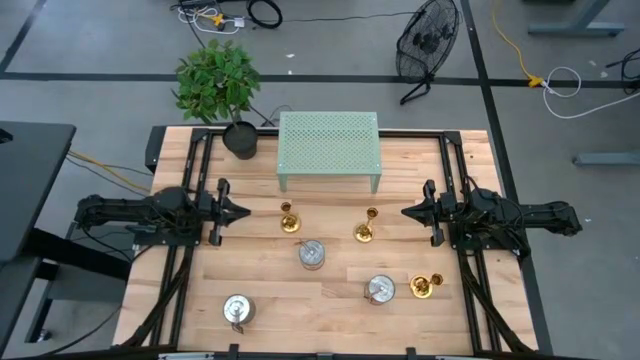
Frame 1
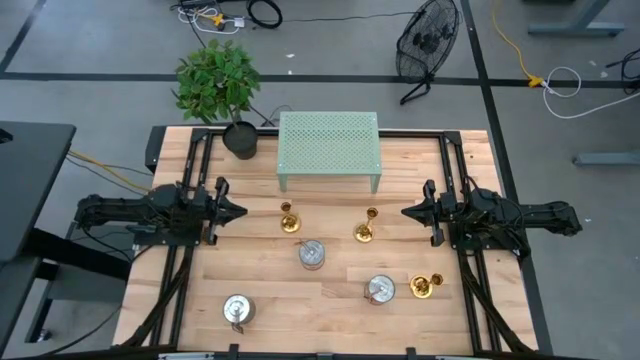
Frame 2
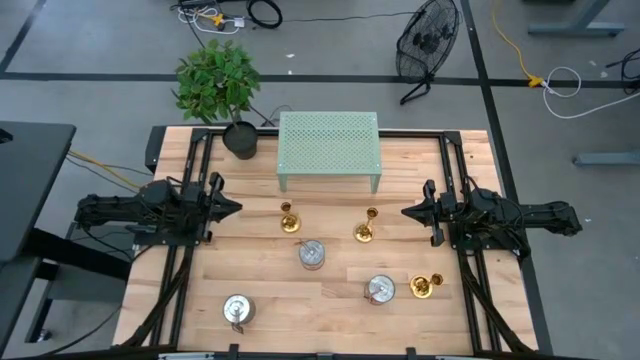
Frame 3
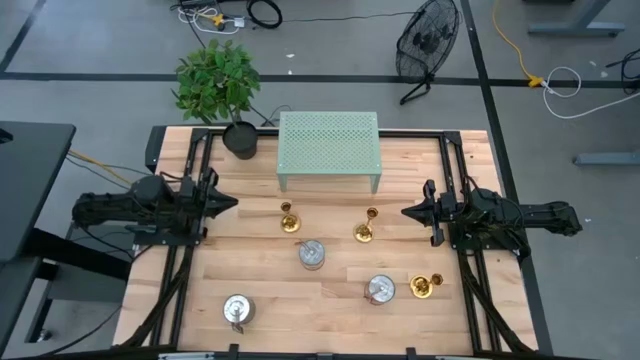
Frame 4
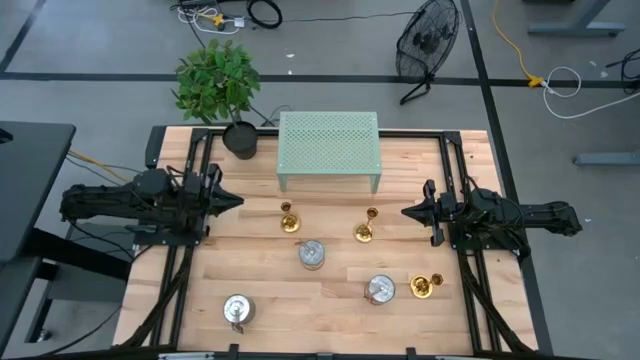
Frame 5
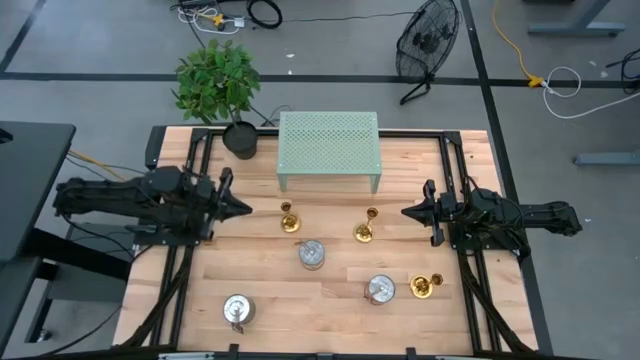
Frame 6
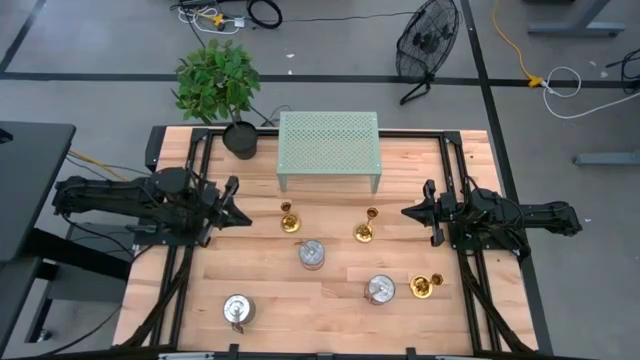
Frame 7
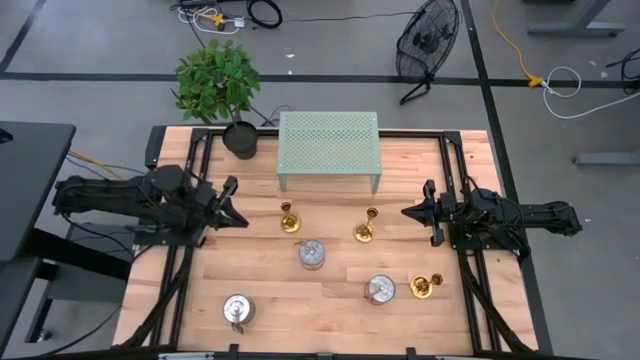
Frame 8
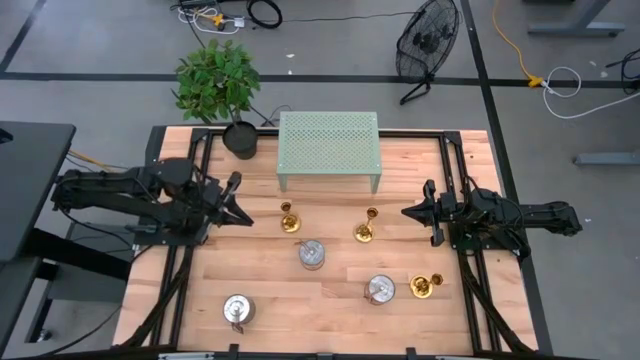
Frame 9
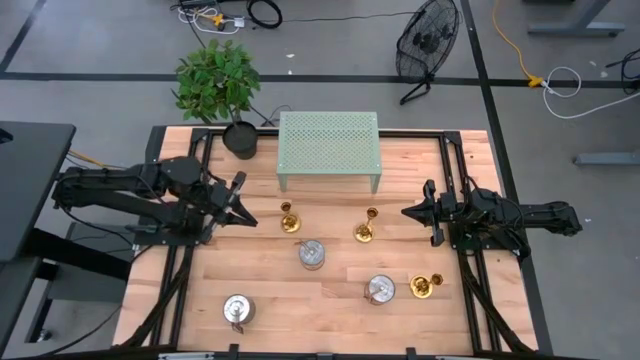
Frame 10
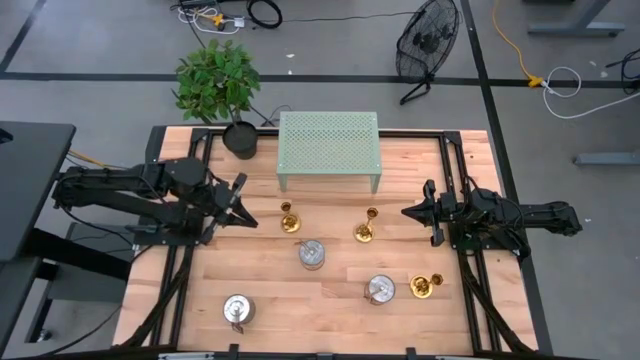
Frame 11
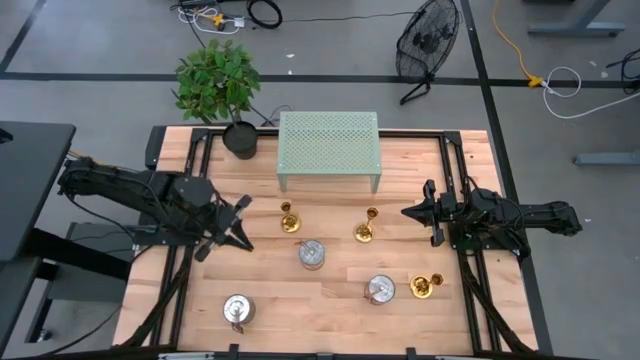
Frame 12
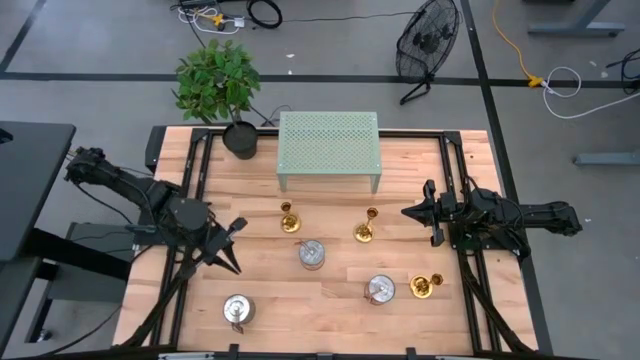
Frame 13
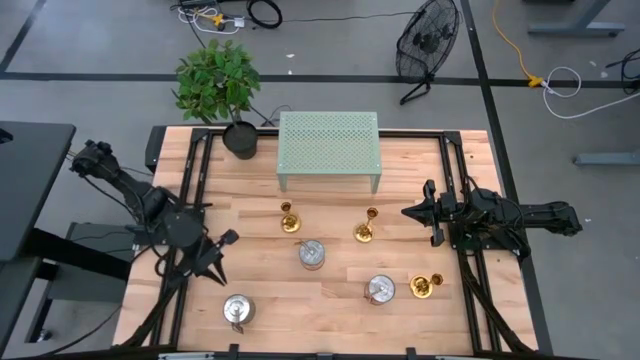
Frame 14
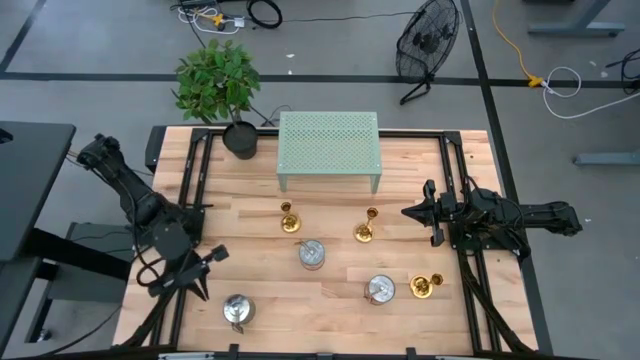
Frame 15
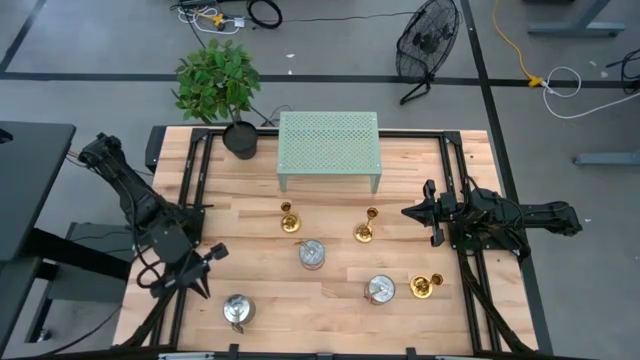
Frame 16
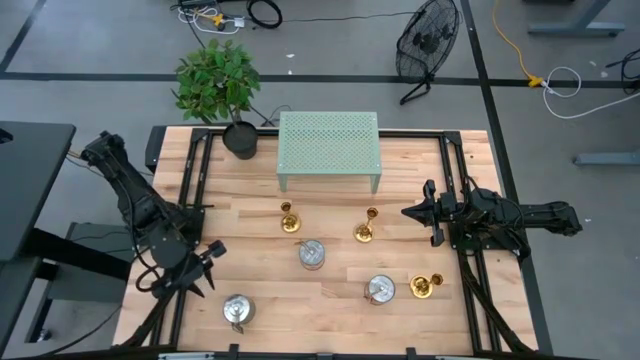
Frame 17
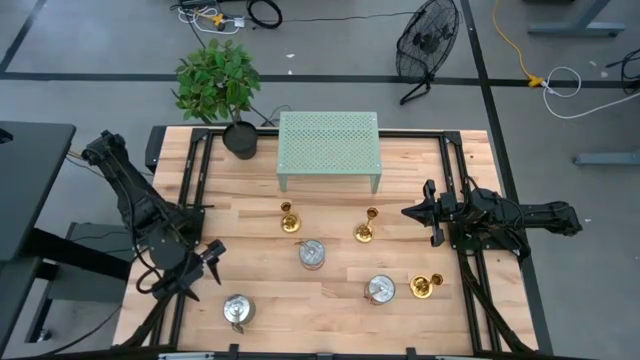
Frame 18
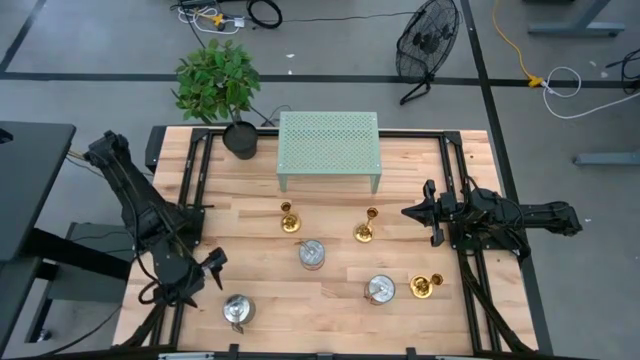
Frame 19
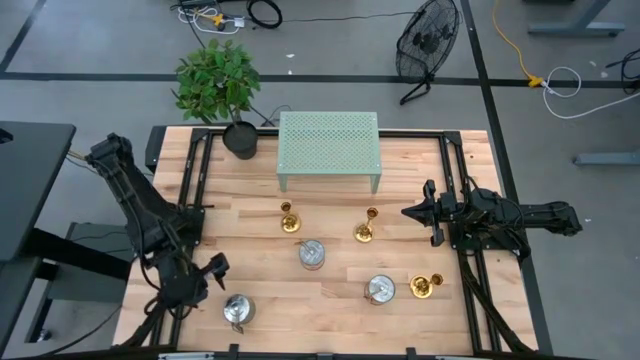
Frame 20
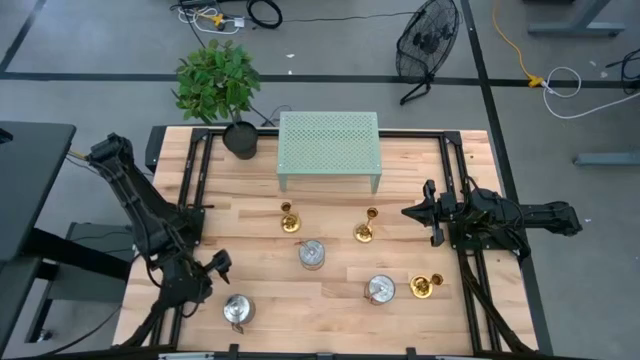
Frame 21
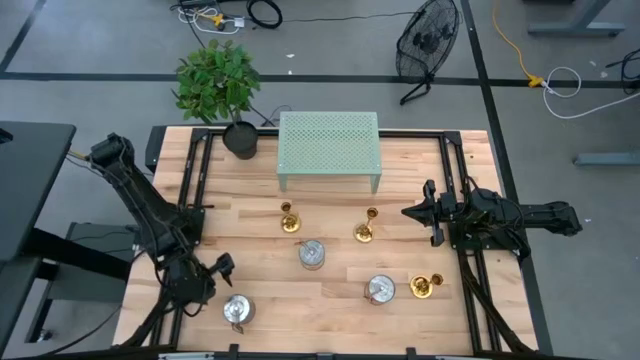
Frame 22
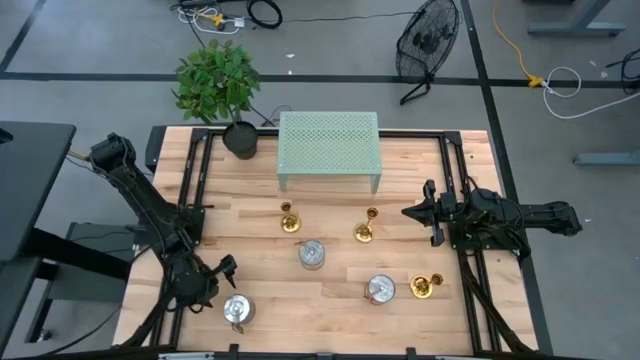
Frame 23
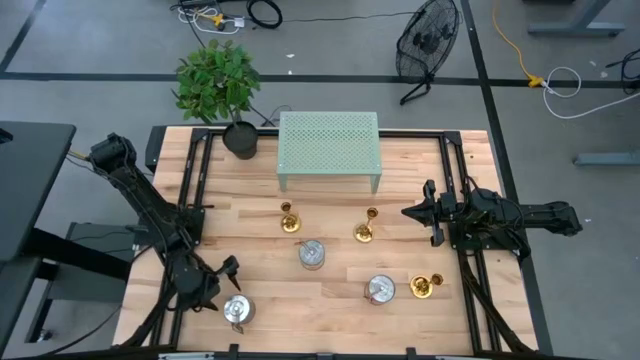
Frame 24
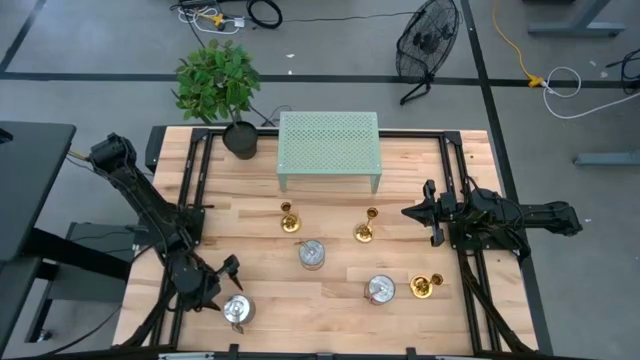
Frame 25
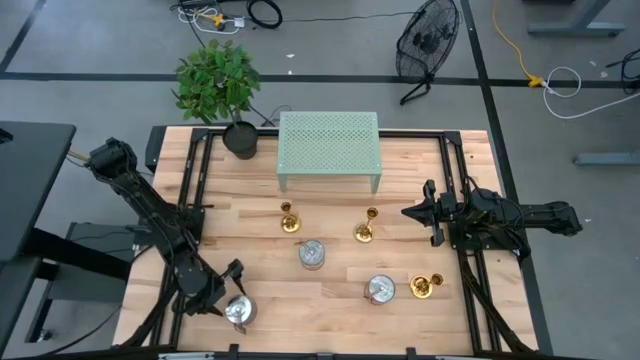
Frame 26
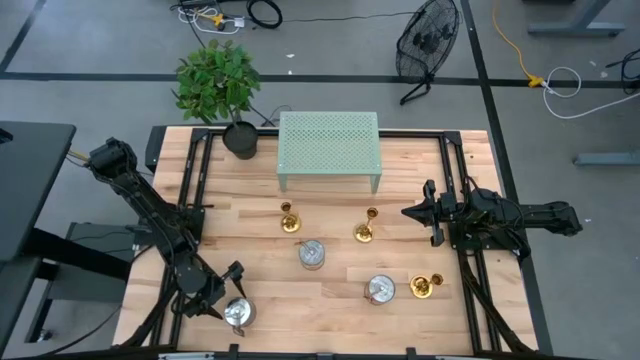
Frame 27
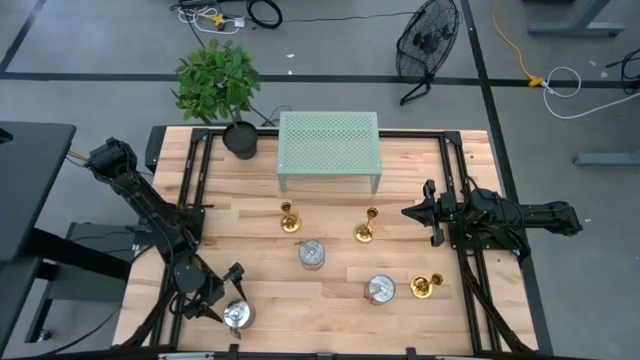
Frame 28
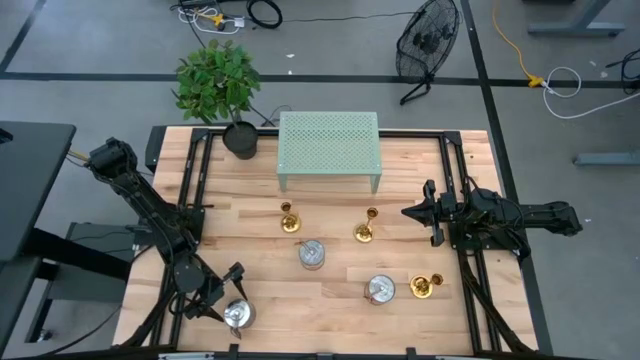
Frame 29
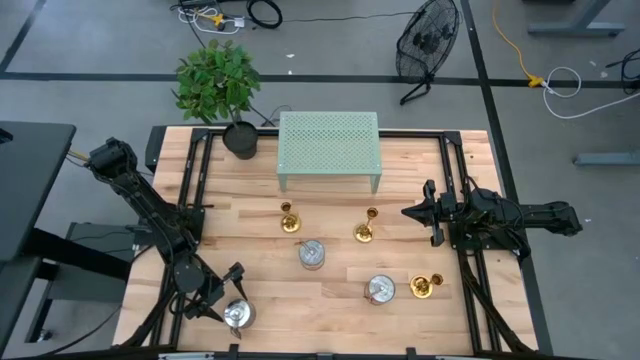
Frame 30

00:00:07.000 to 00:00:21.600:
Task: Pick & Place candle stick holders
Put the bottom silver scented candle on the shelf

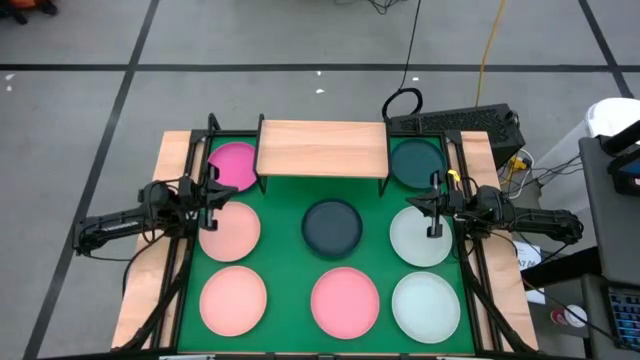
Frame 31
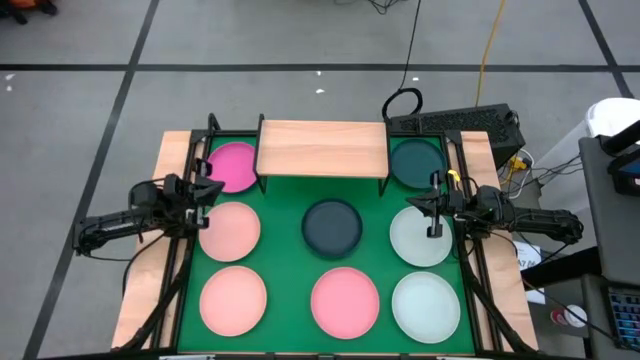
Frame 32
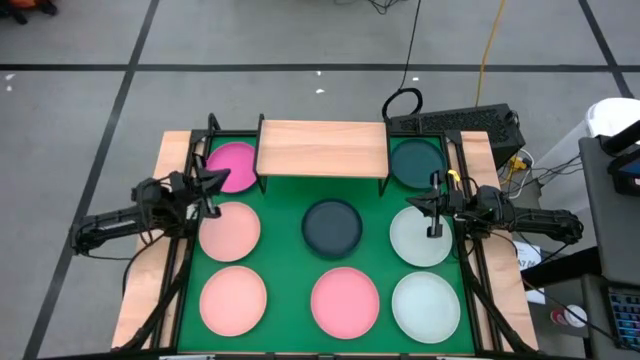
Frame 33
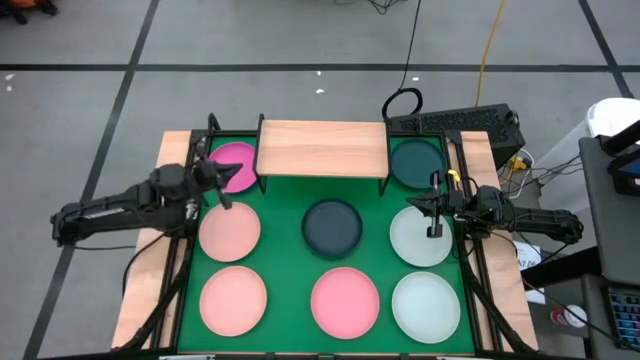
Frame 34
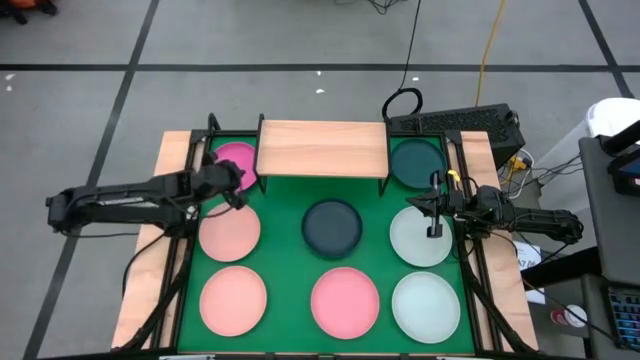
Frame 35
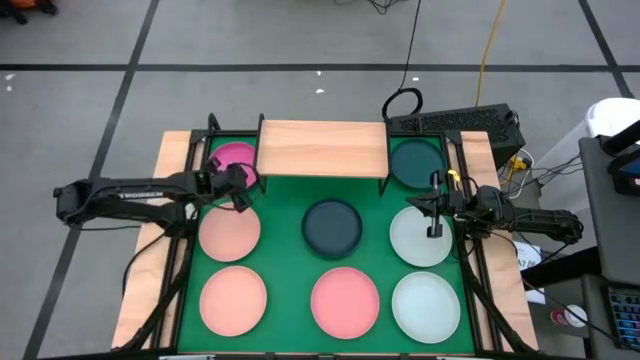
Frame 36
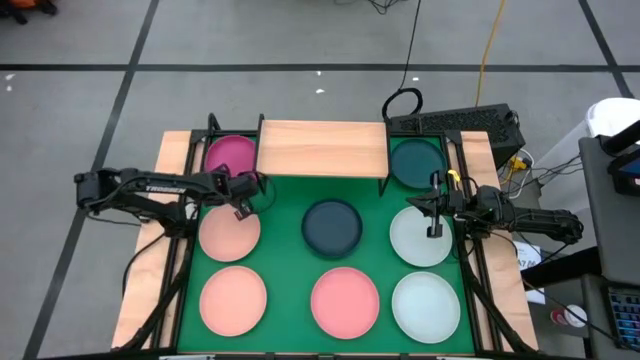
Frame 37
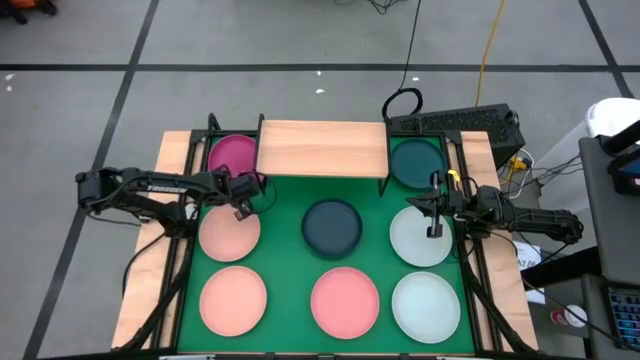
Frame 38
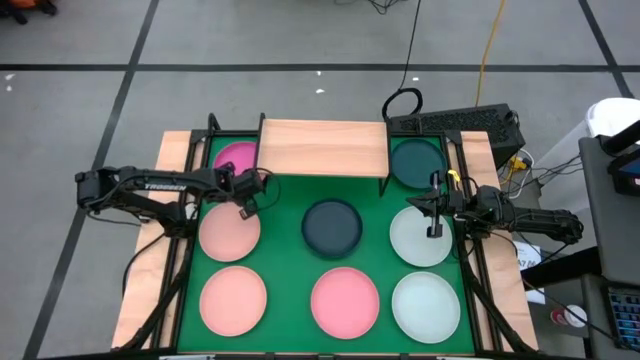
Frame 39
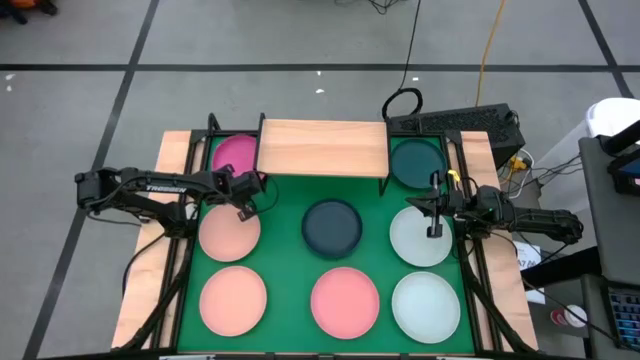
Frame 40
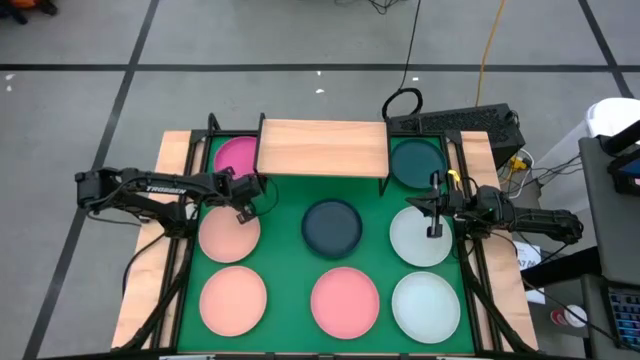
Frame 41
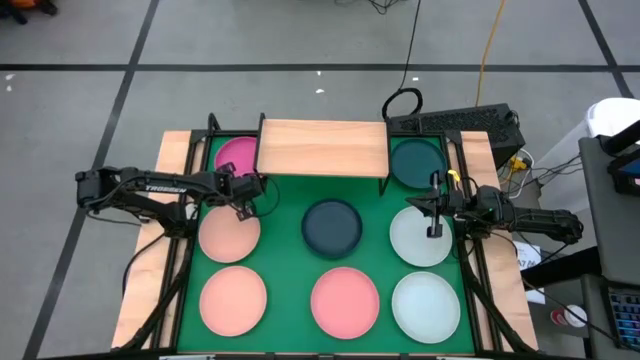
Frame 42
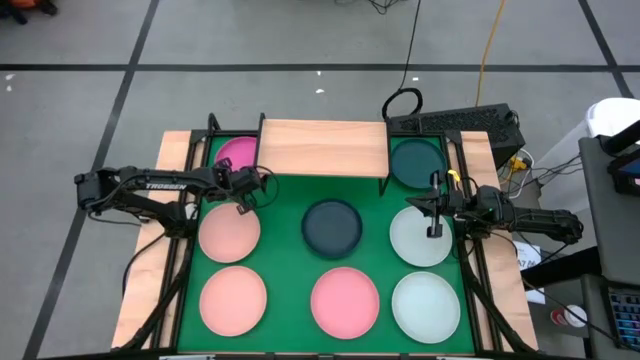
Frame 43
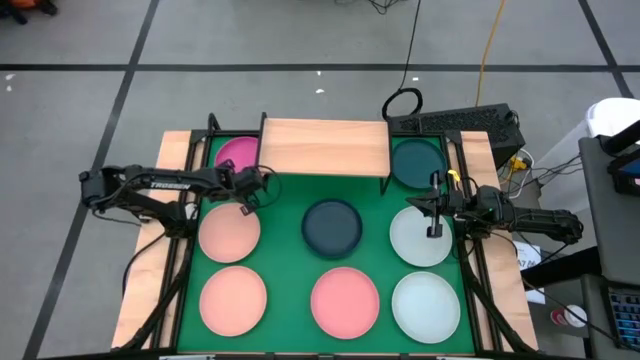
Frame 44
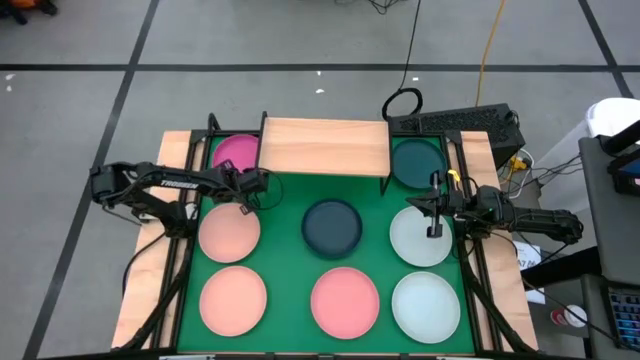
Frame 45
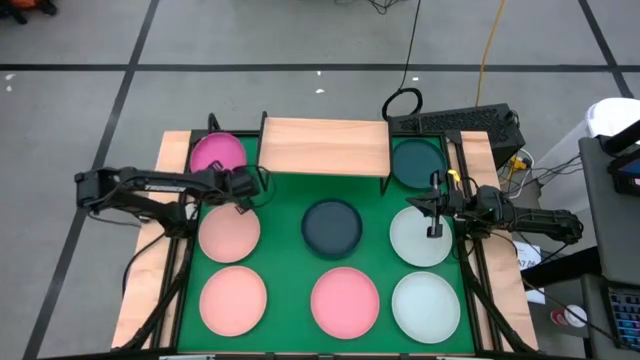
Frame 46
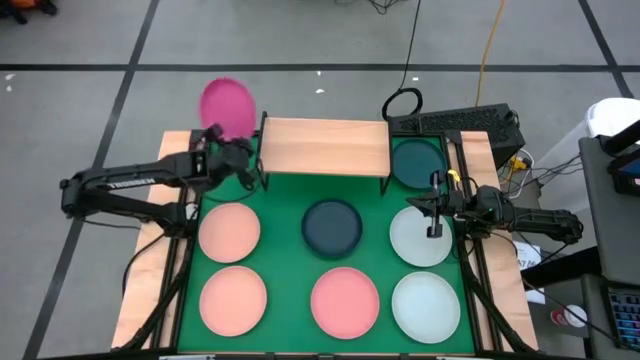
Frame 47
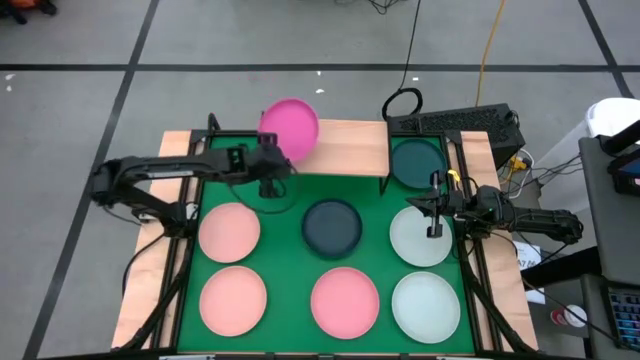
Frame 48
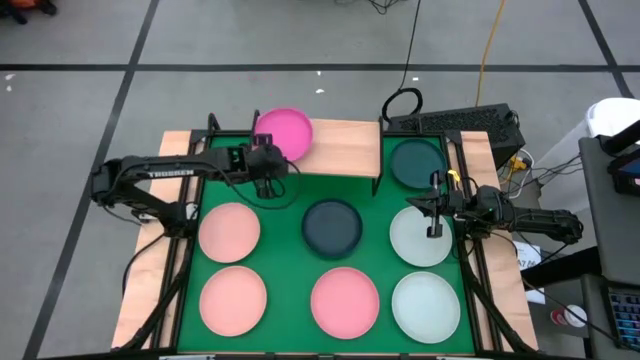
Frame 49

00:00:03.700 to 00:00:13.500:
Task: Place and stack plates onto a shelf
Put the dark pink plate on the shelf
